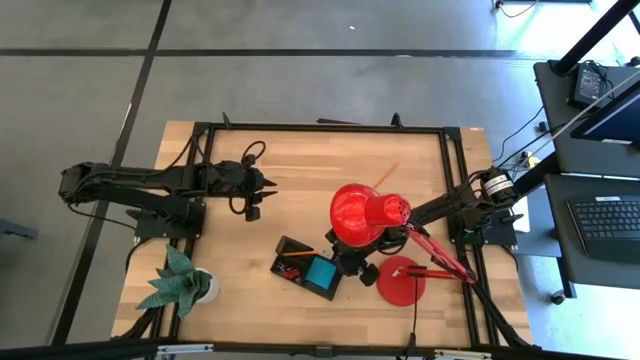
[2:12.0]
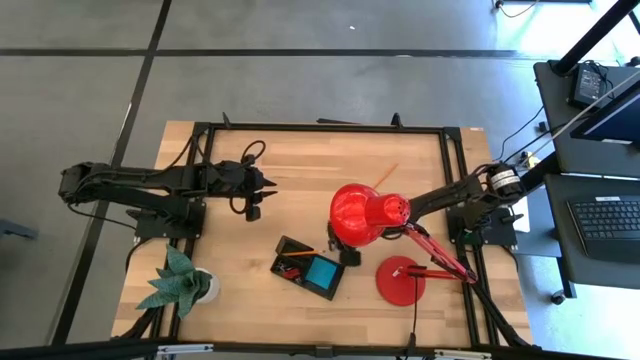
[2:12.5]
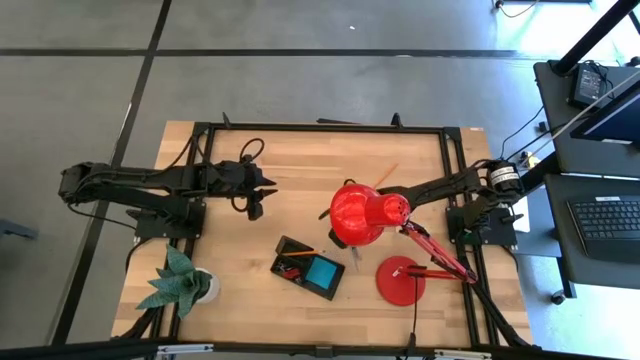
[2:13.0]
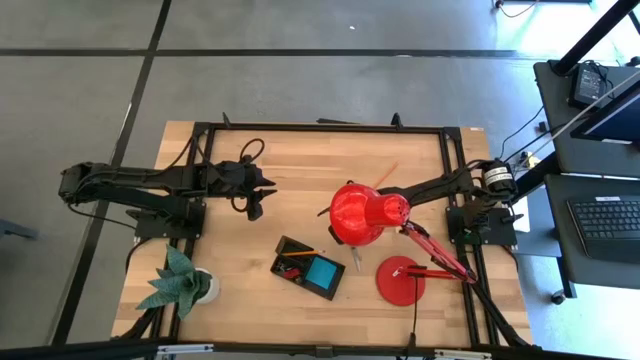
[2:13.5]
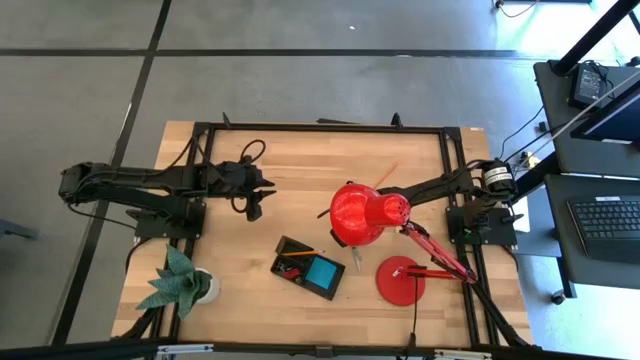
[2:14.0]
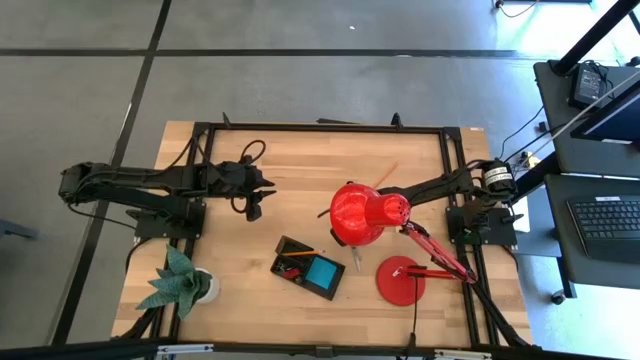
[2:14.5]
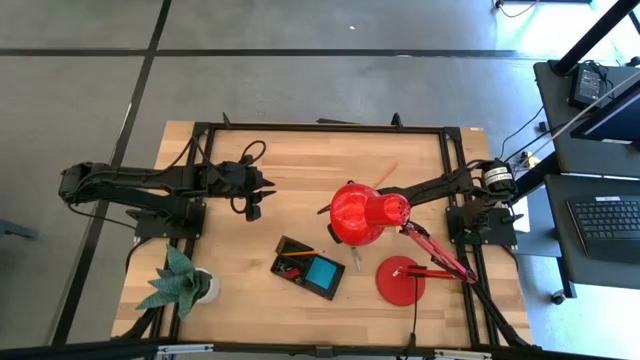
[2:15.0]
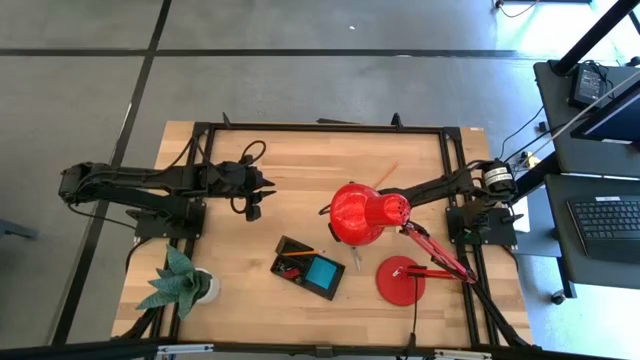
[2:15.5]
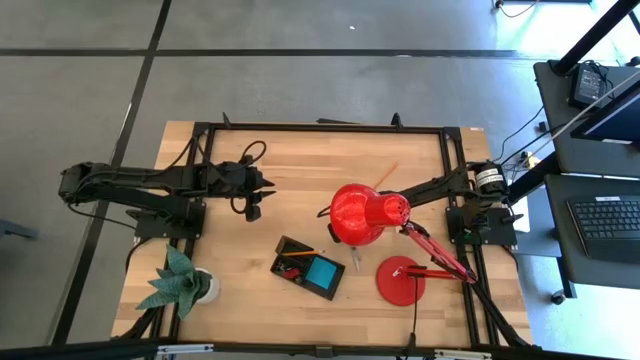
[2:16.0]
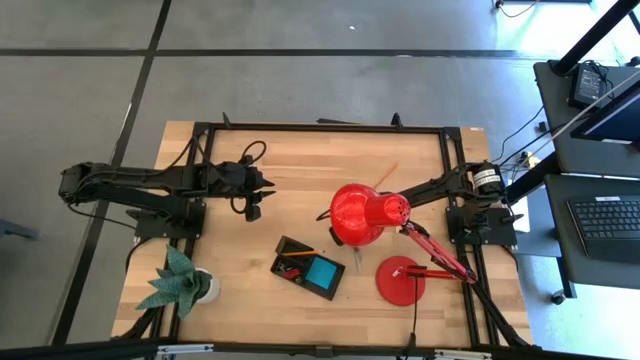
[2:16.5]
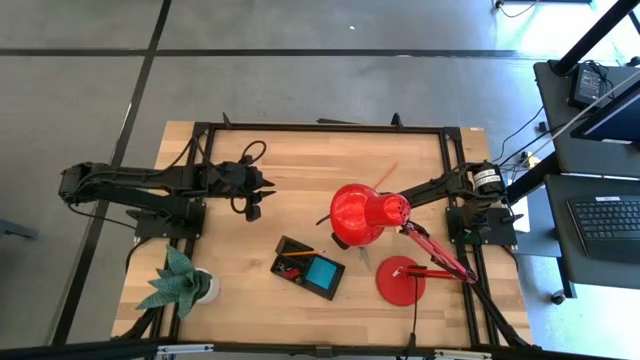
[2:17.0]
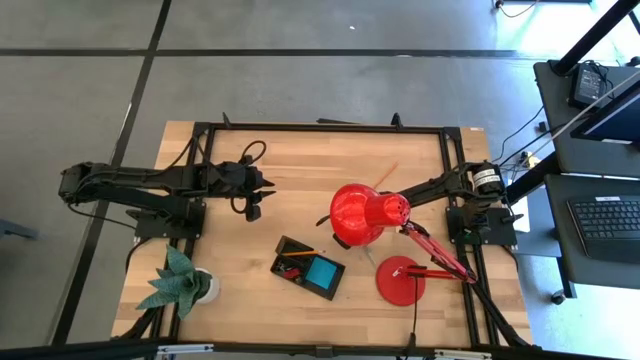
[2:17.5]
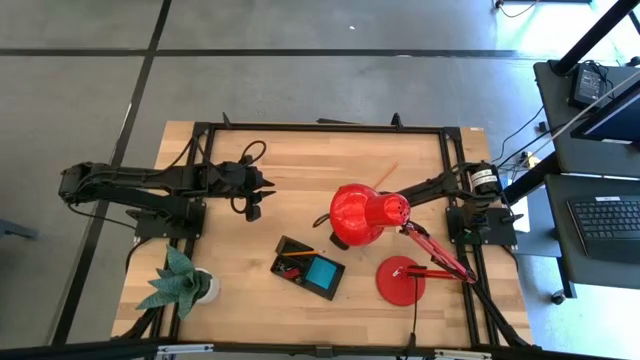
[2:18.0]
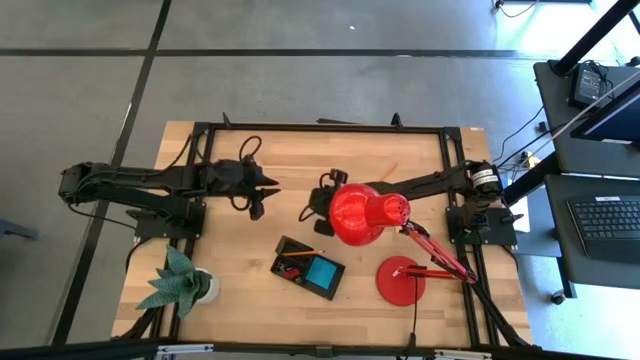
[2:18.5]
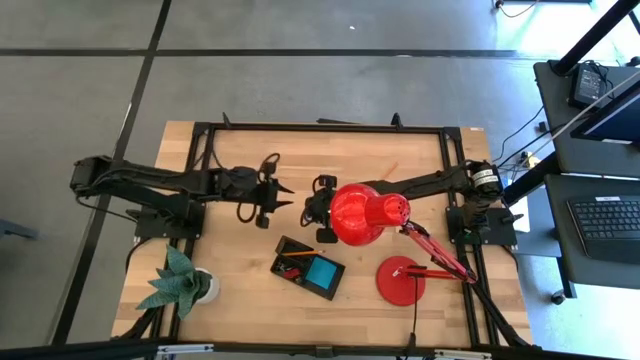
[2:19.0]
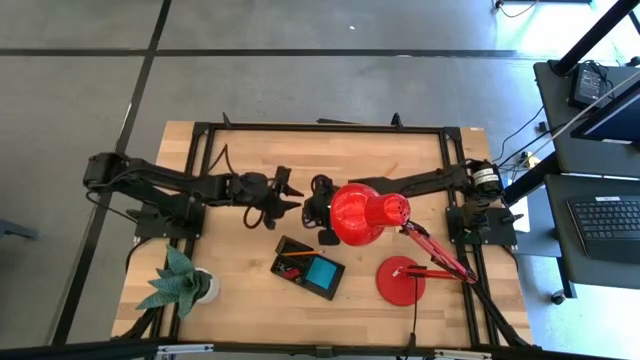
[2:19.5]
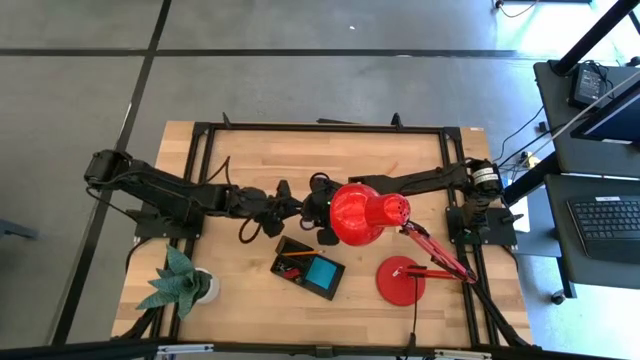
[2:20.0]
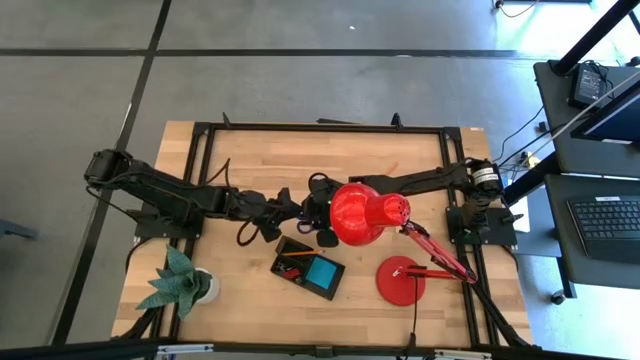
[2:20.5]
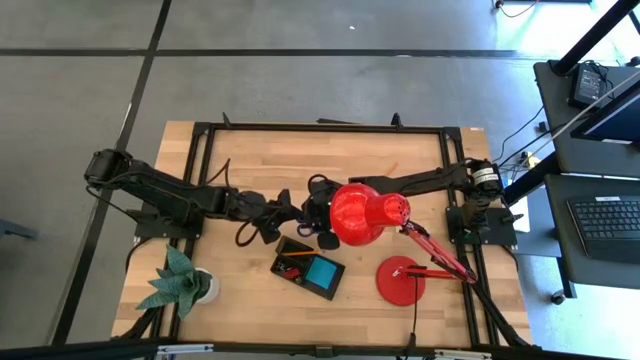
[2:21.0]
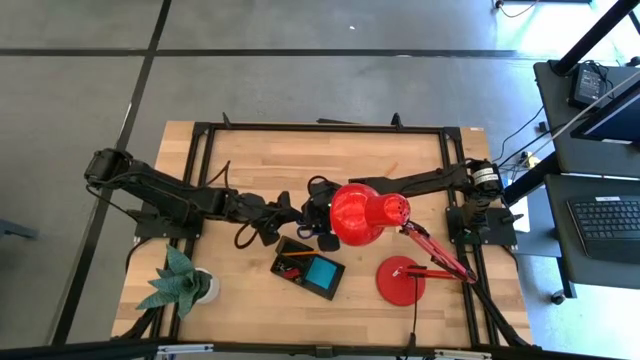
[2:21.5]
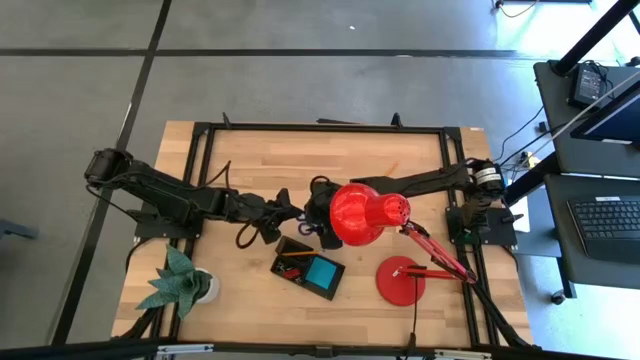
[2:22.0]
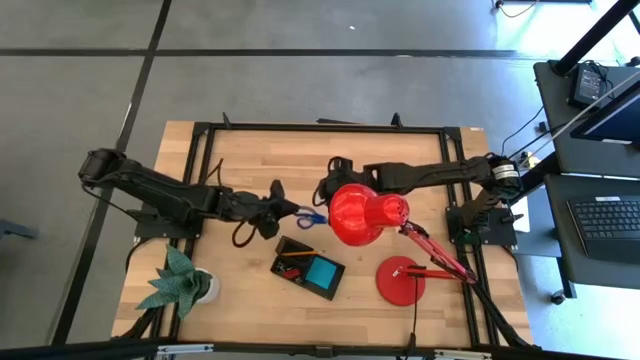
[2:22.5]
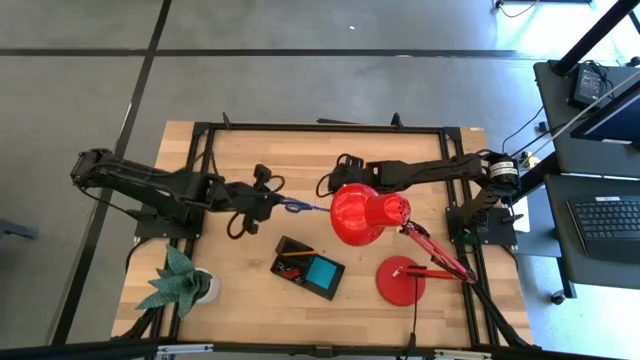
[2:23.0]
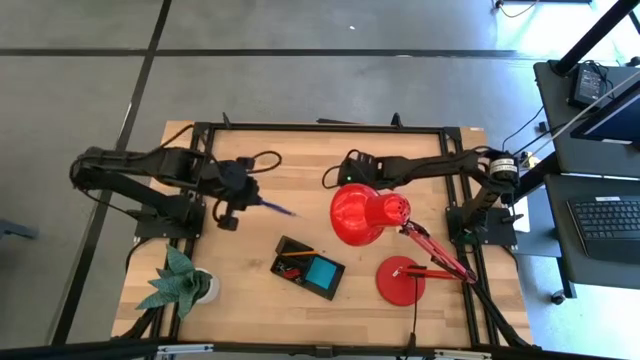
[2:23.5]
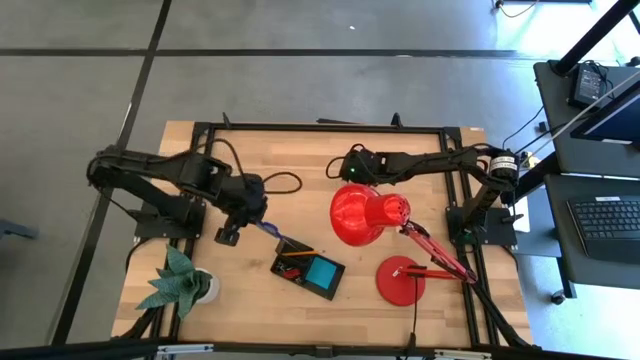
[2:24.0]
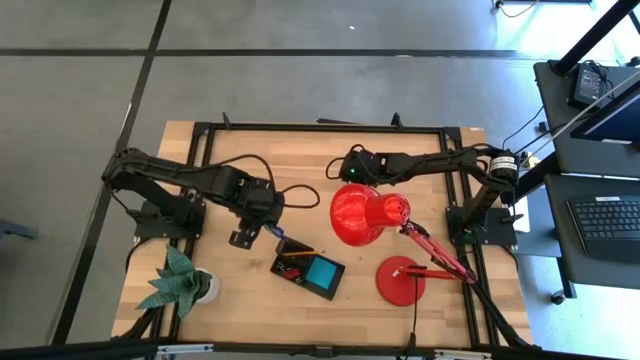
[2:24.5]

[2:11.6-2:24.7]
Task: Pick and place office supplies into organizer
Put the blue scissor into the desk organizer

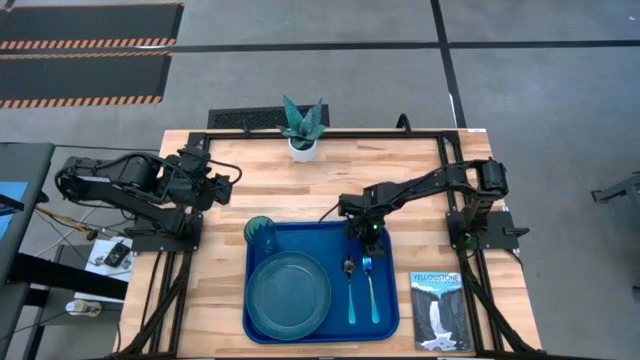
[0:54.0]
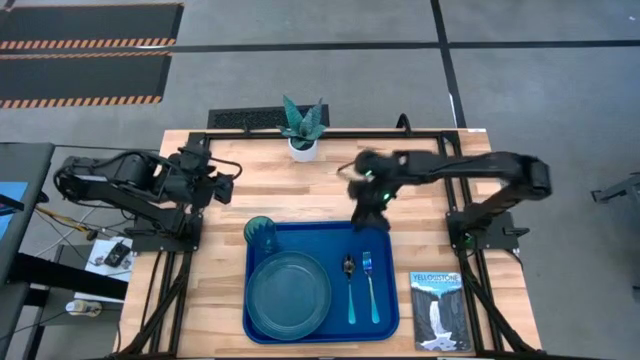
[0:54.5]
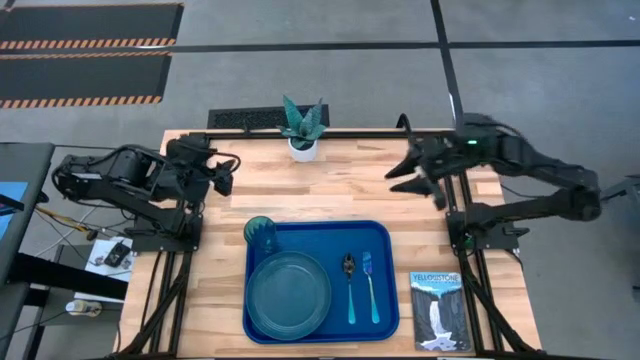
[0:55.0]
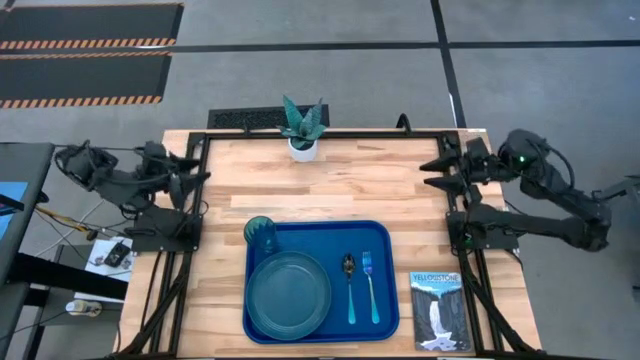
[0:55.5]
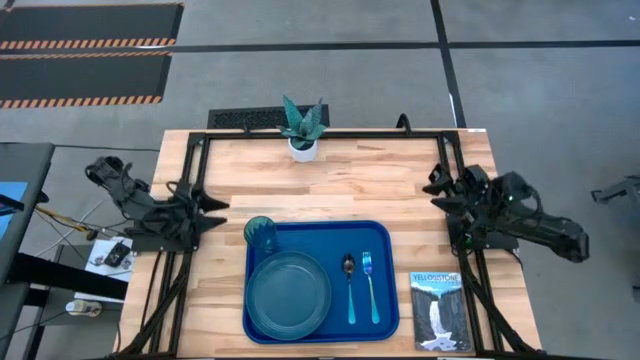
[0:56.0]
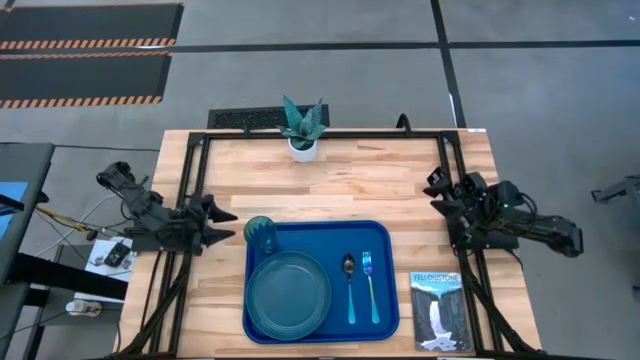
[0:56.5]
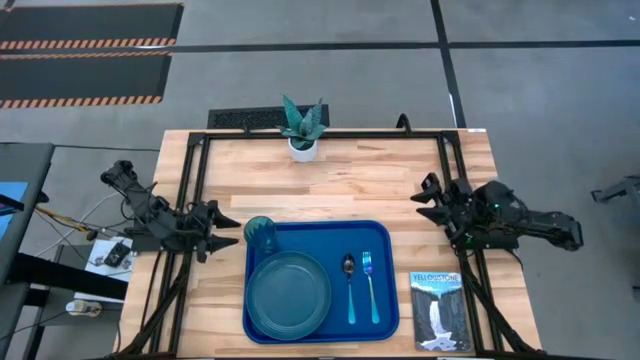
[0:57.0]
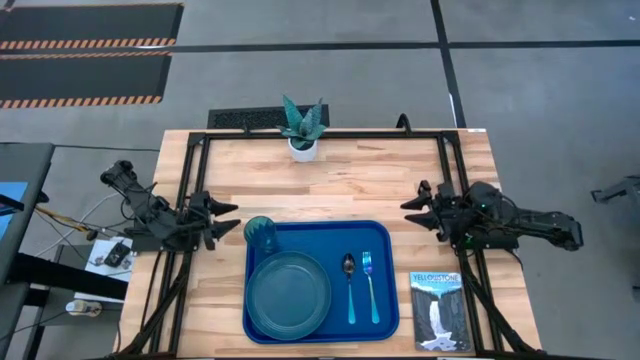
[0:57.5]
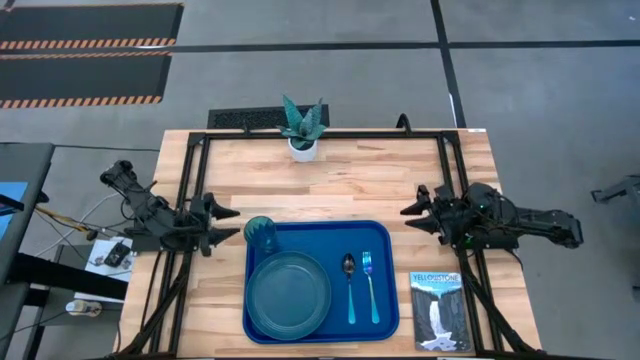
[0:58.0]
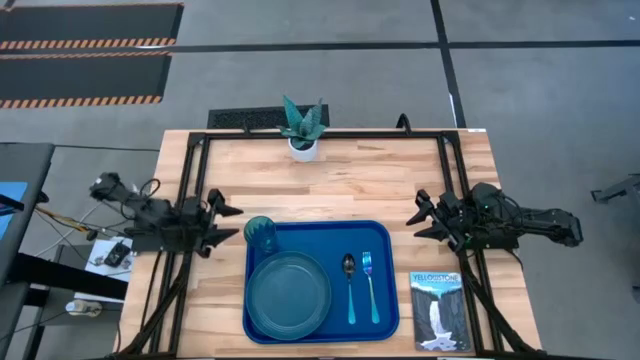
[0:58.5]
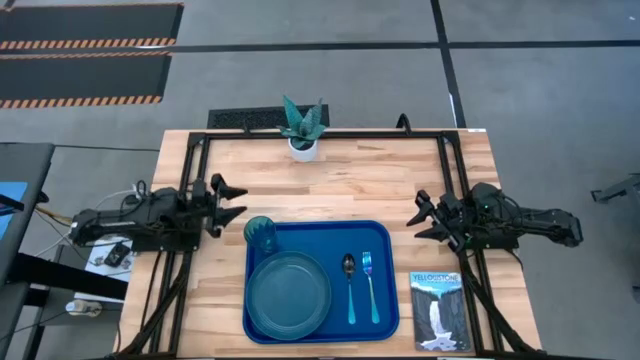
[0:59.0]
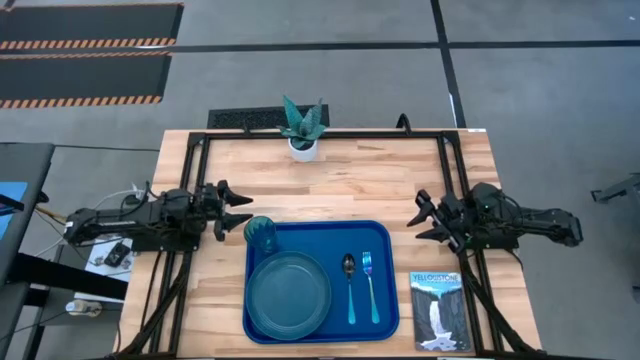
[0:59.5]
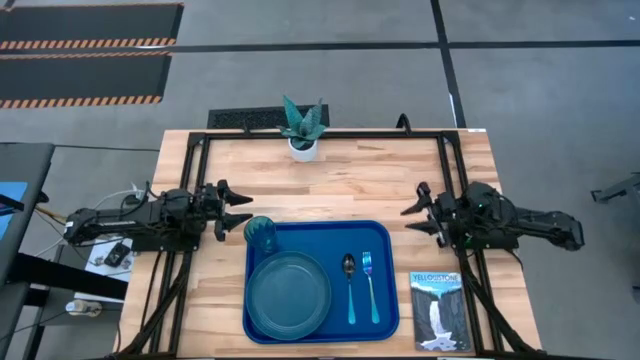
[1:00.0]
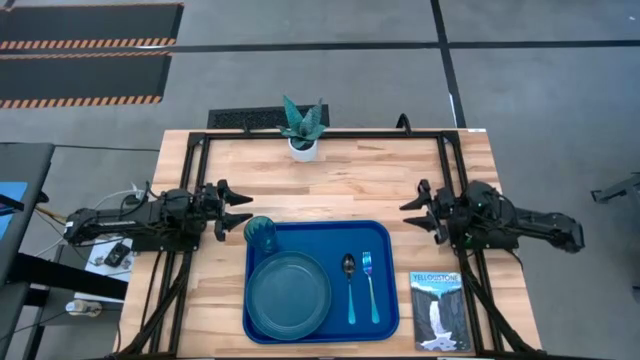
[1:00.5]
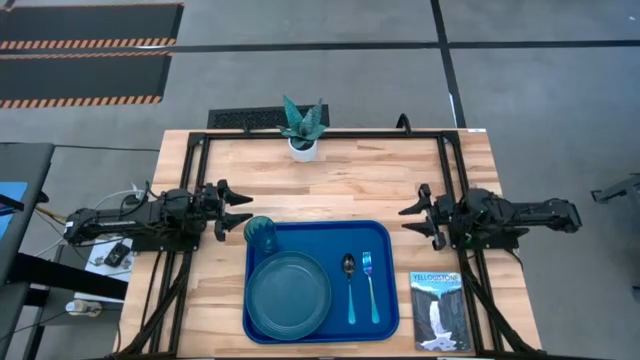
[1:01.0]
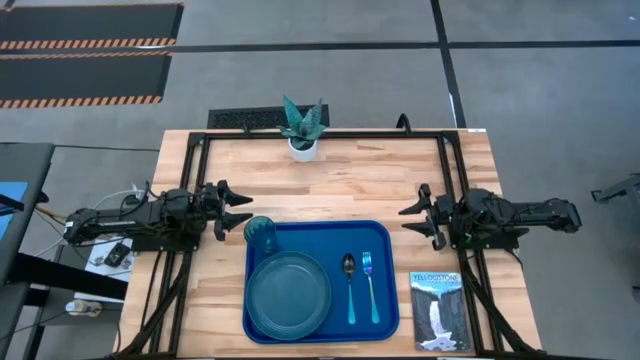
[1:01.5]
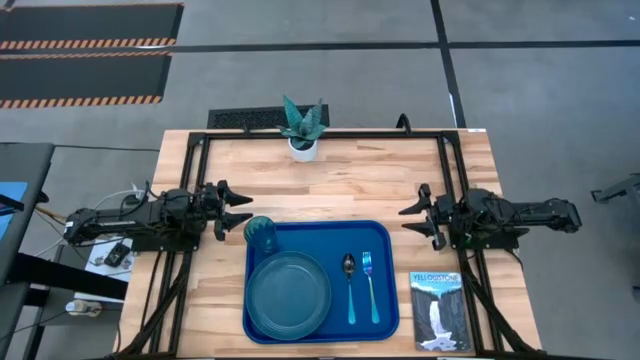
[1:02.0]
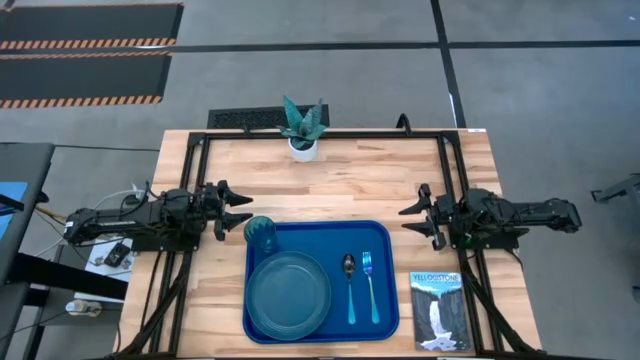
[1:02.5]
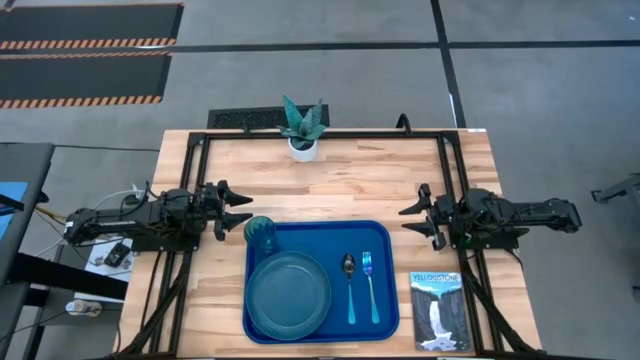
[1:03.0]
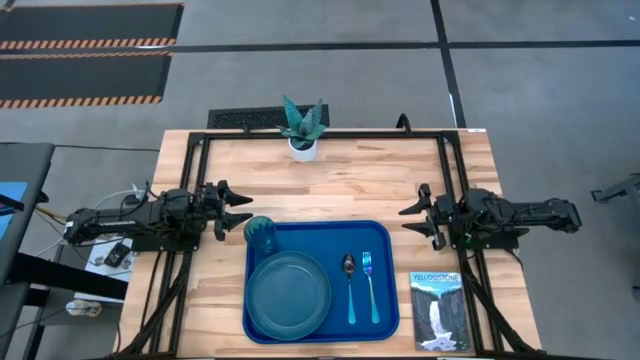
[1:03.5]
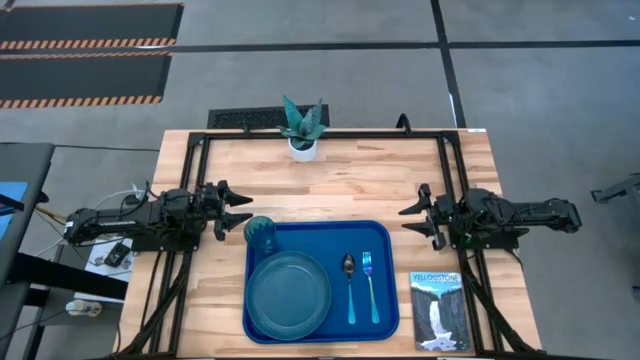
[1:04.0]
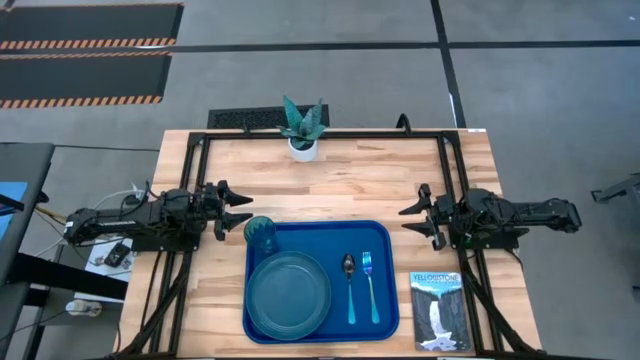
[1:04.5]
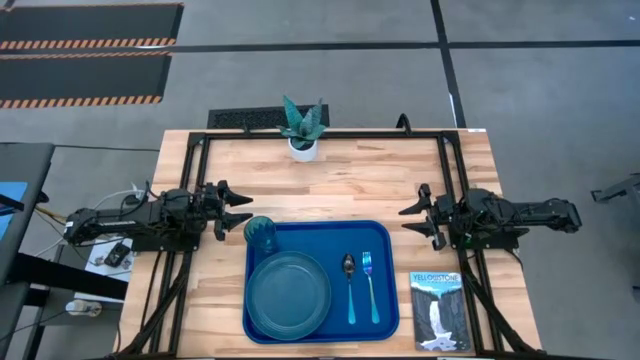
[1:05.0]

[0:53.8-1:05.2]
Task: Pick and place plate/cup/fork/spoon on tray
Return to Home Position
